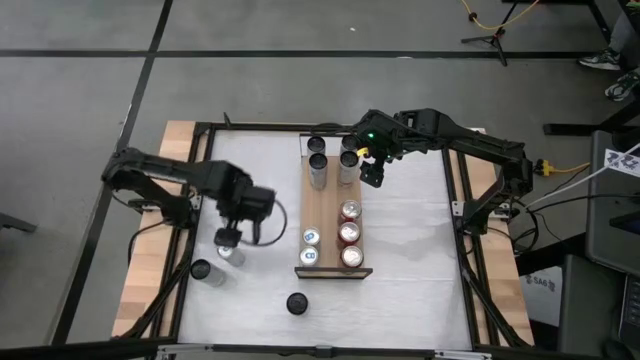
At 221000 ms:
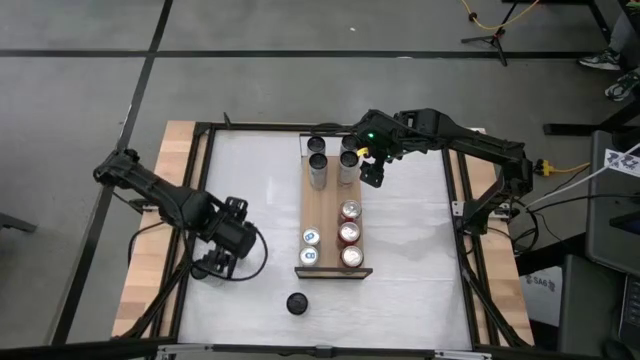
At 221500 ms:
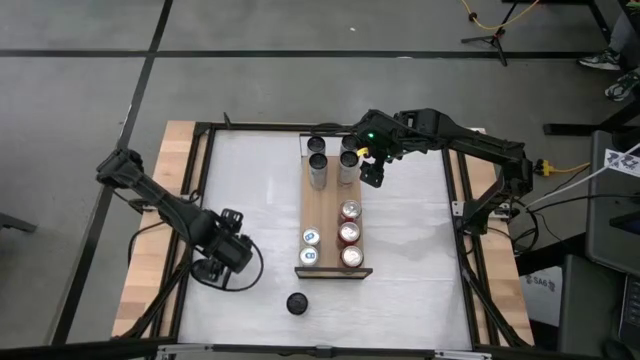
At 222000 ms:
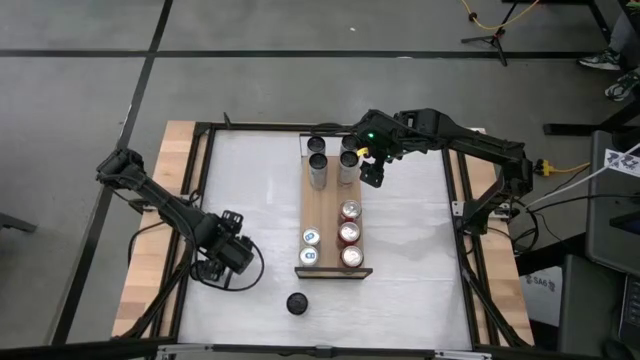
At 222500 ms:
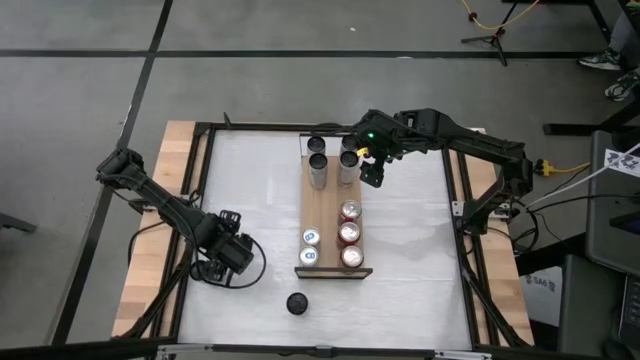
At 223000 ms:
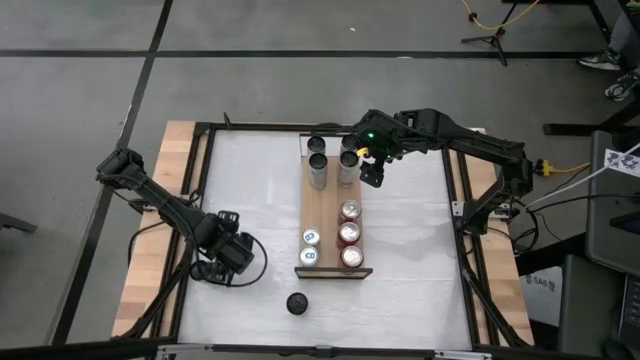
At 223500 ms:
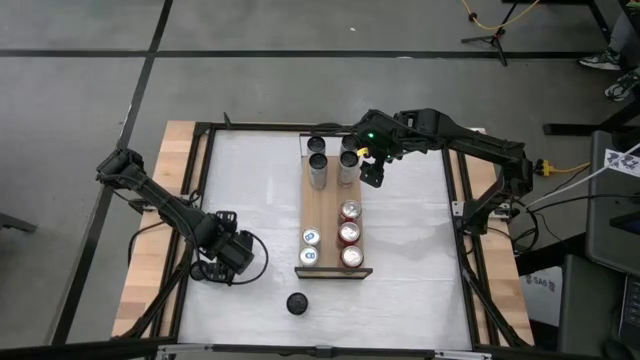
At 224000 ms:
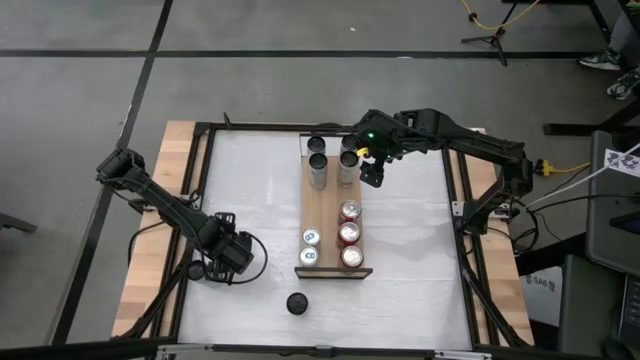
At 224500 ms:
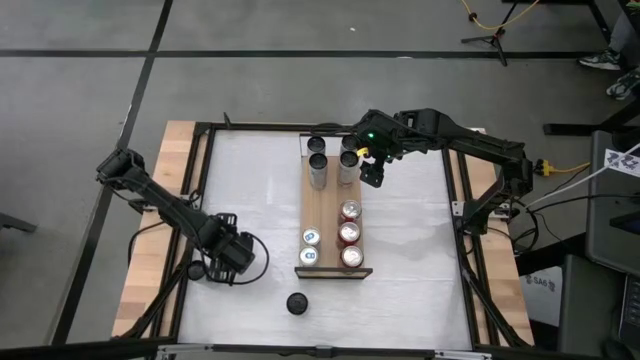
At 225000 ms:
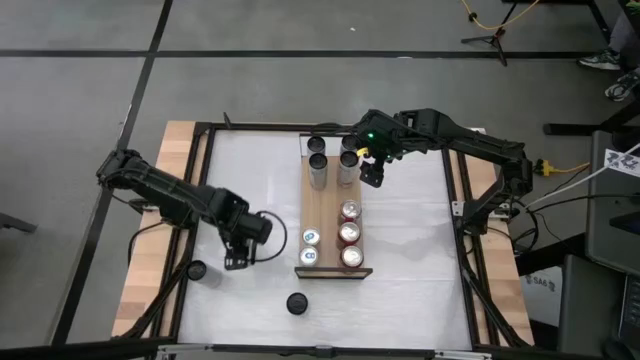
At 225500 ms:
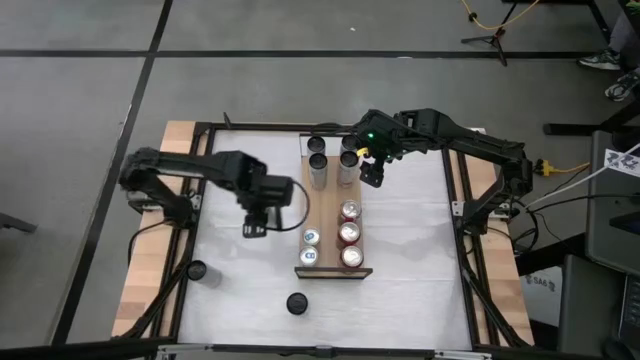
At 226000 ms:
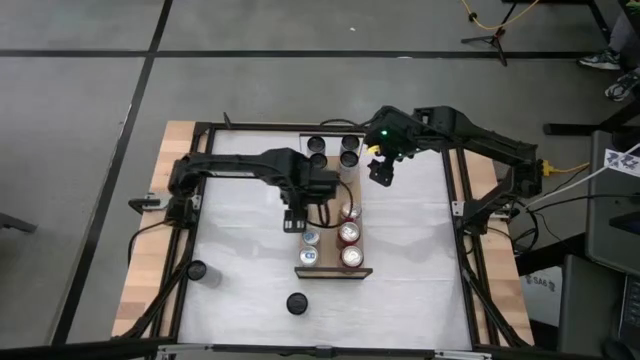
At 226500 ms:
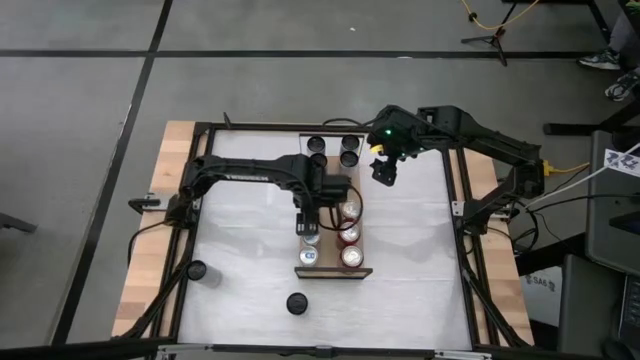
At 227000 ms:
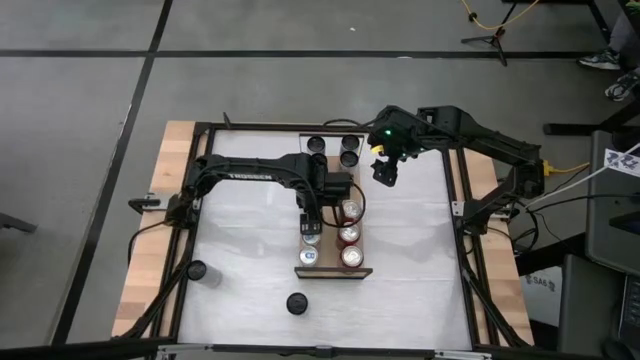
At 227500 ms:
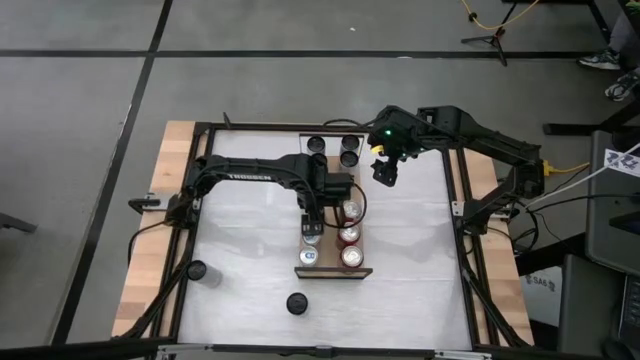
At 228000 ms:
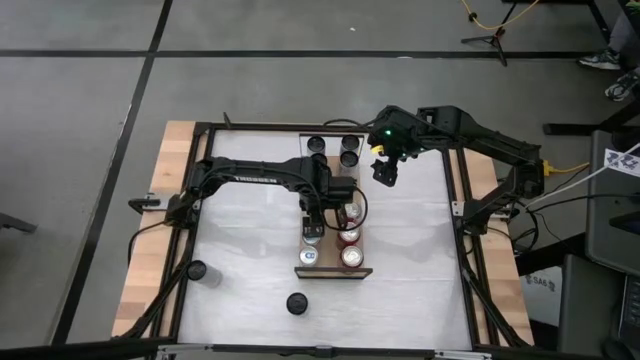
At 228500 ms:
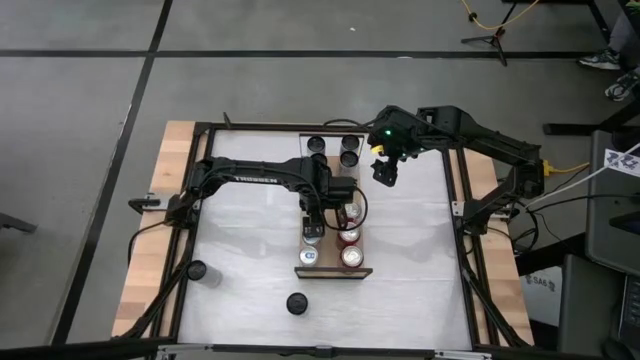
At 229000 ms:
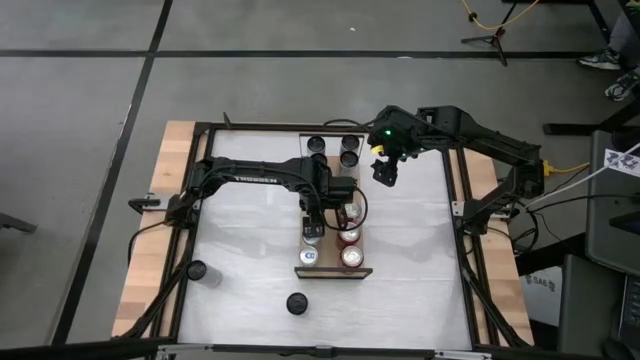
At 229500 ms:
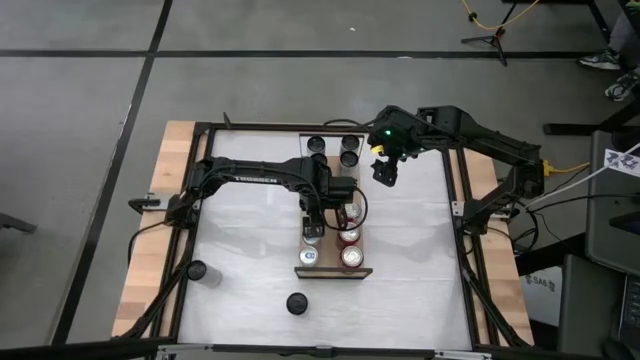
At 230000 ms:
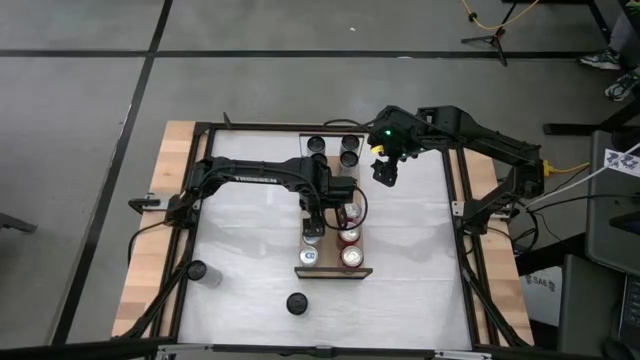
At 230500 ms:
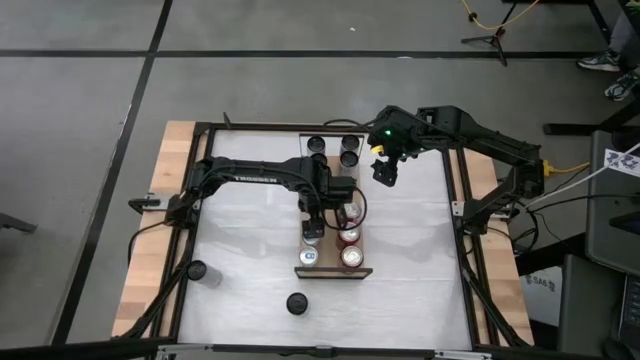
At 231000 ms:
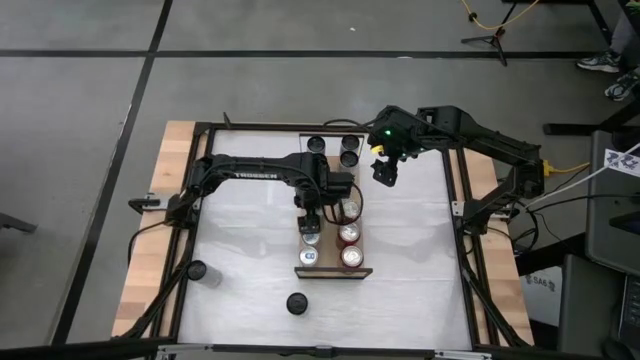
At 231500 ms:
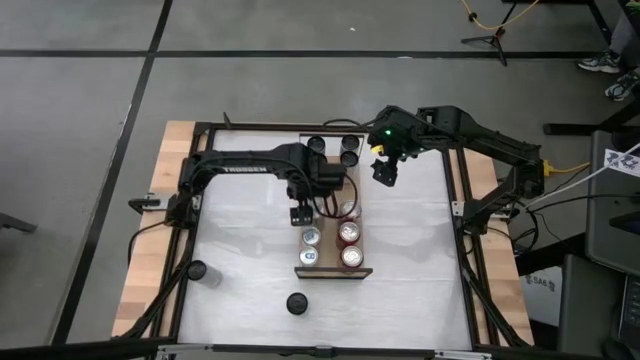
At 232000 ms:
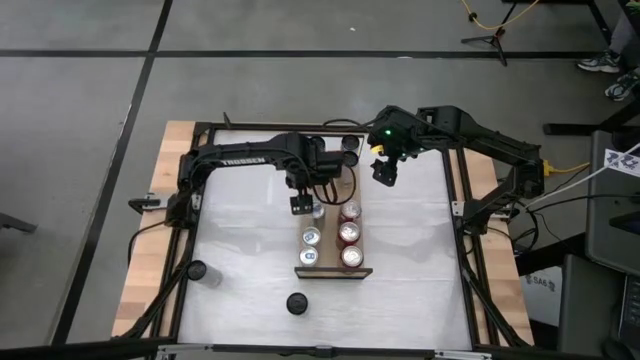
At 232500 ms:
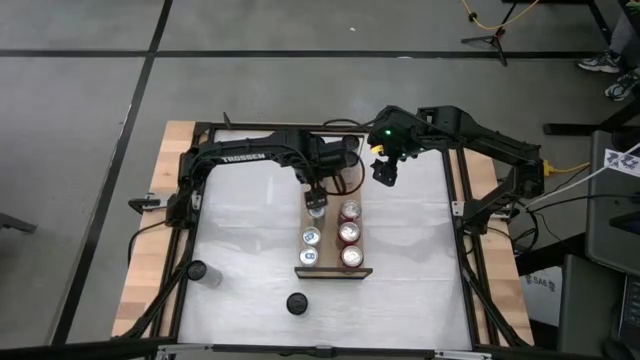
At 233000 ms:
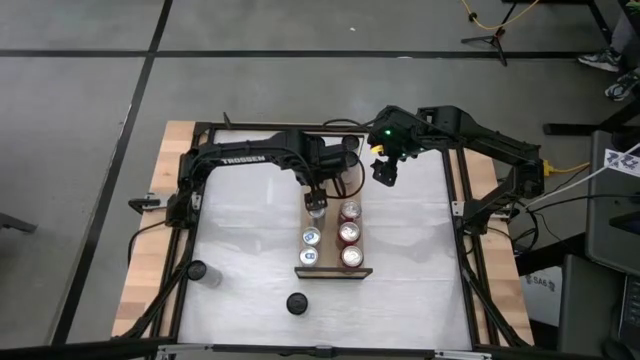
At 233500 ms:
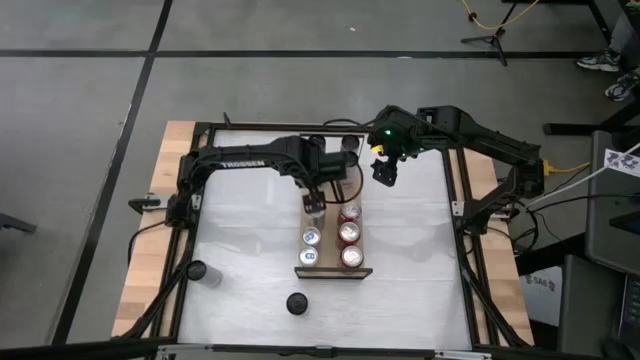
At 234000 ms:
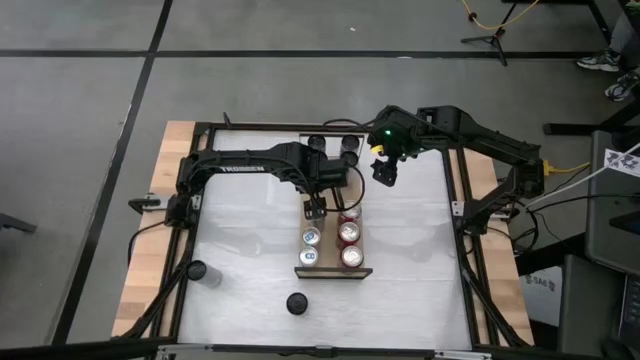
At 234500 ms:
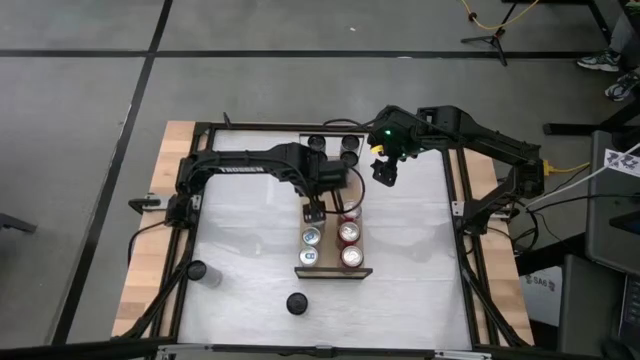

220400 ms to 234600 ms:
Task: Place canned beverage on shelf
Put the blue soda can on the shelf aligned with the other blue soda can

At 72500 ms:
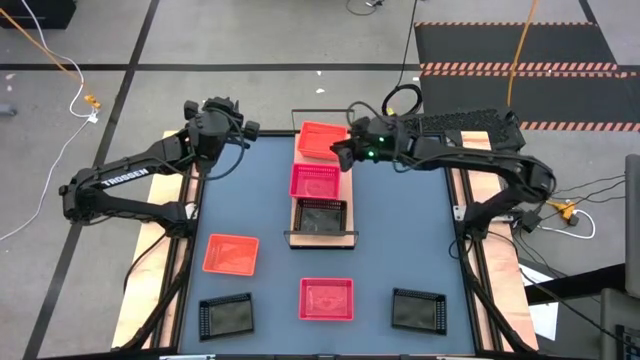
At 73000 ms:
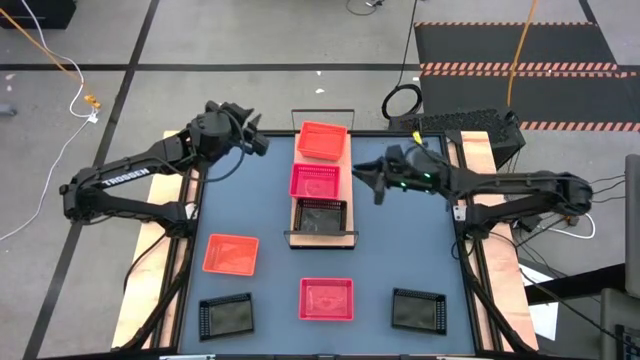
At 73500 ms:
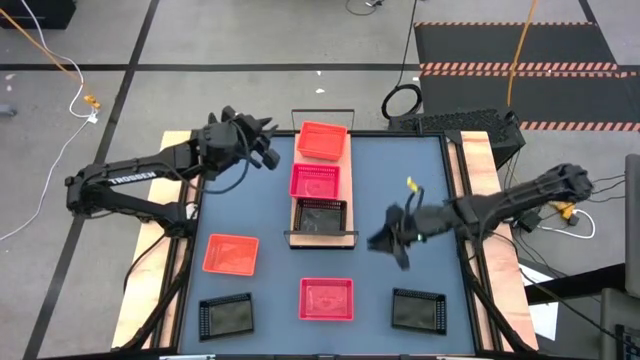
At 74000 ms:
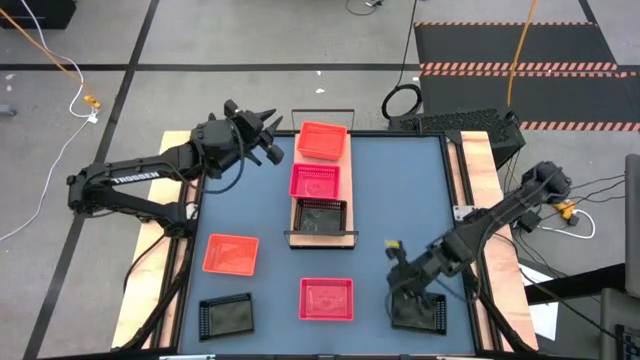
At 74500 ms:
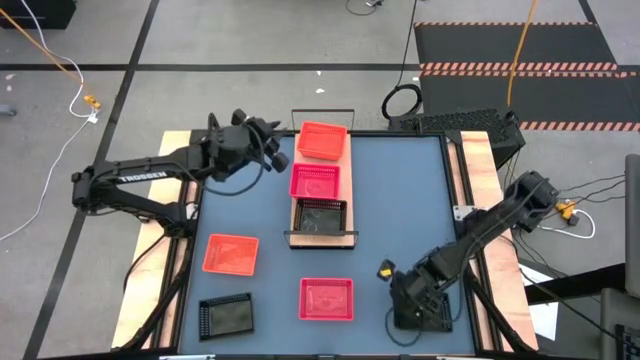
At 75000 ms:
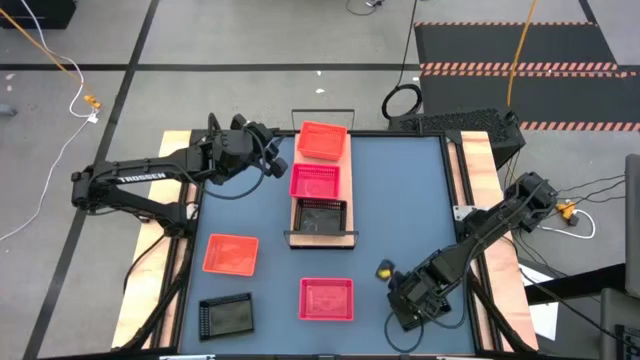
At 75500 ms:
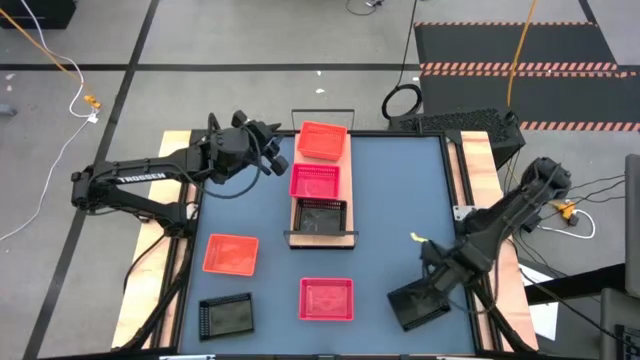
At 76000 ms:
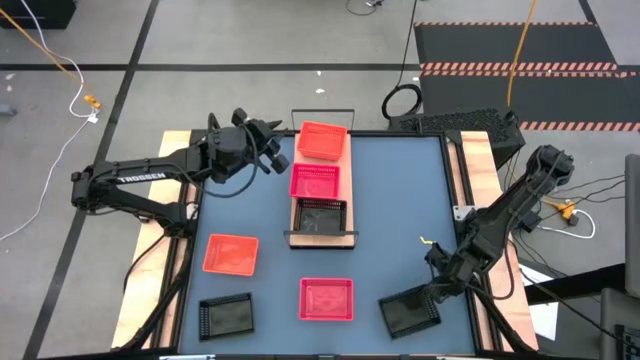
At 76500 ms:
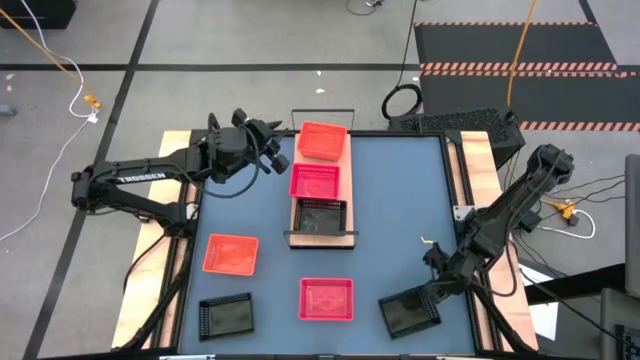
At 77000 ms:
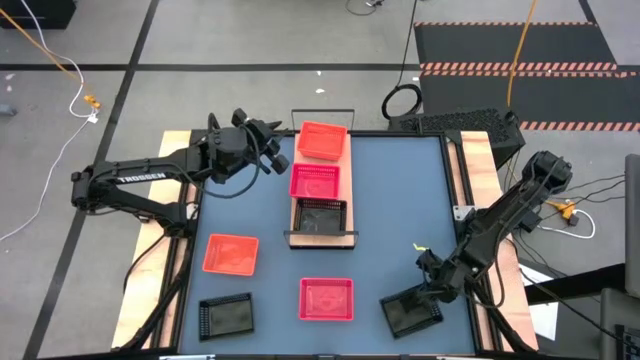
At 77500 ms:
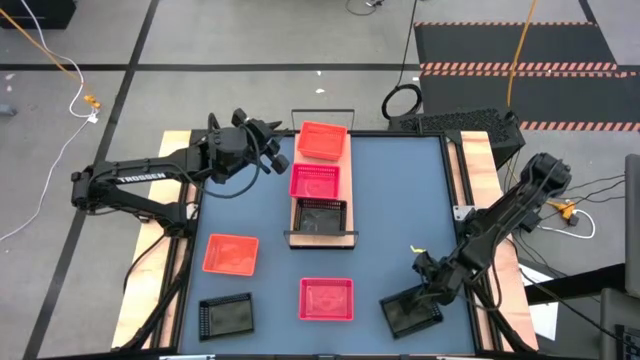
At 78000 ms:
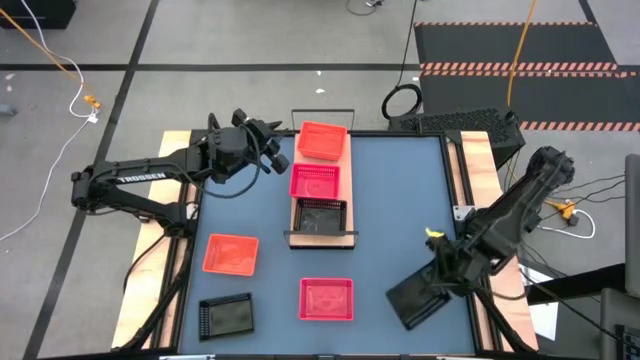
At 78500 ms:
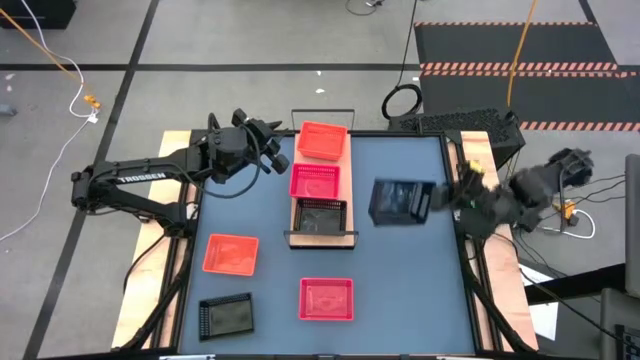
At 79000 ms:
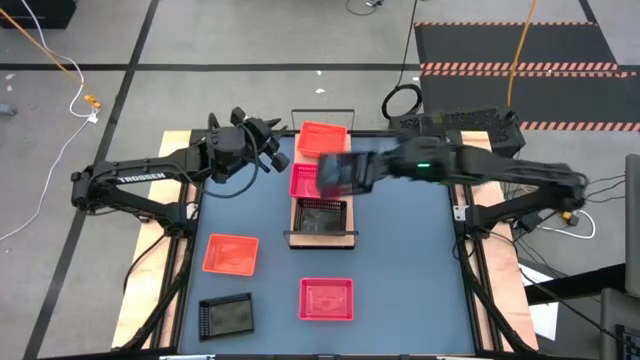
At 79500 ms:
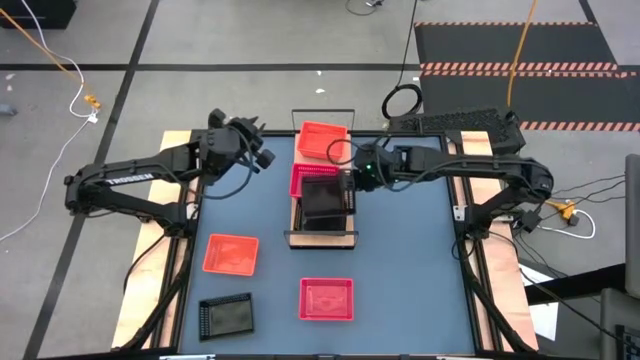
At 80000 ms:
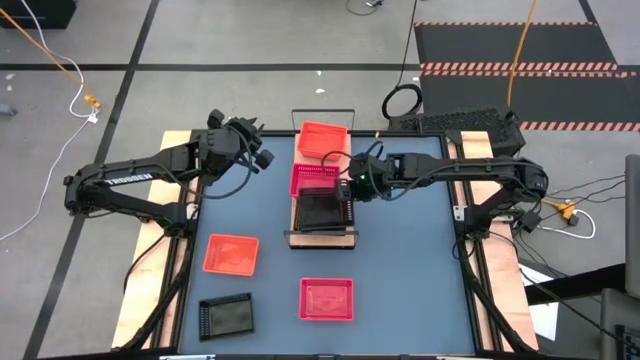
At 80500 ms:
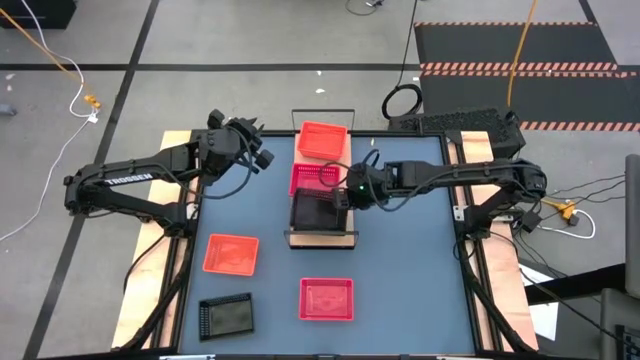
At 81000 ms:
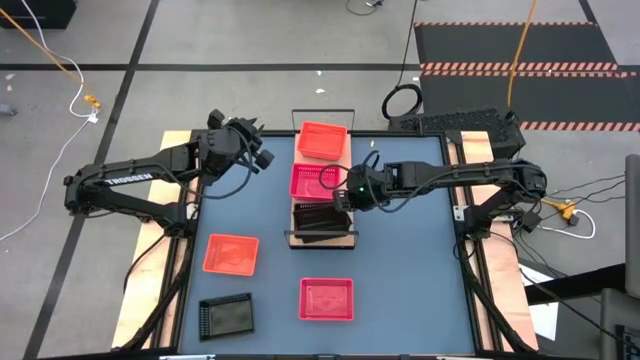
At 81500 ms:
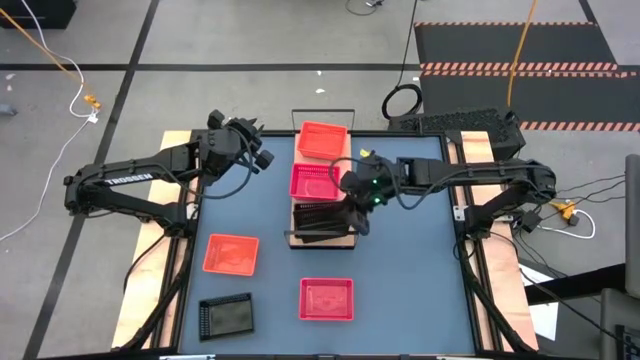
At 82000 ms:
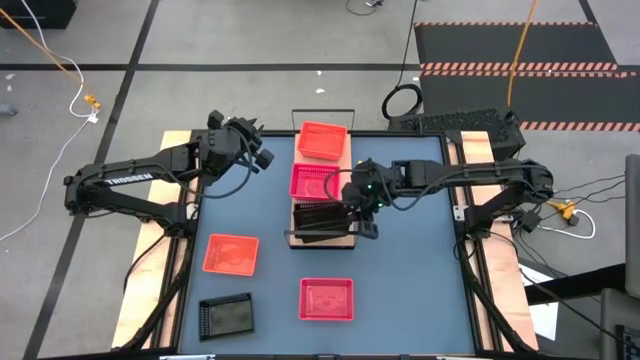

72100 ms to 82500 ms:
Task: Stack baskets on shelf by color
Stack the right black bin on the black bin on the shelf
